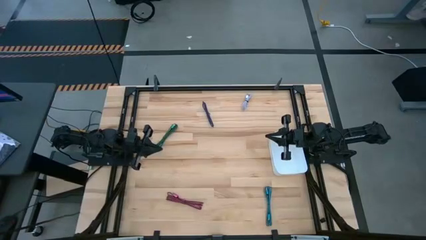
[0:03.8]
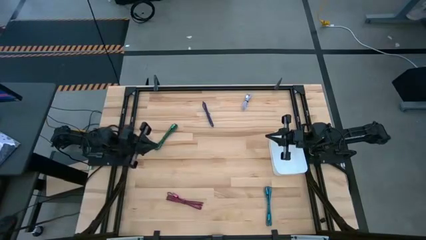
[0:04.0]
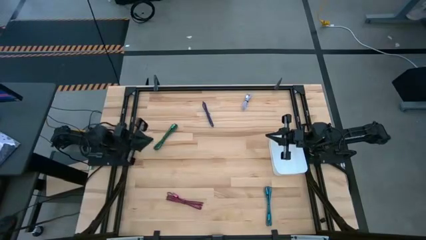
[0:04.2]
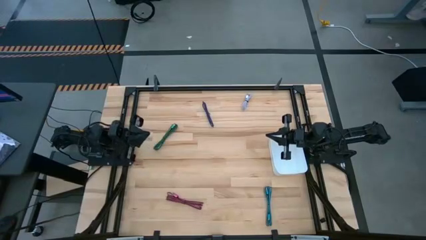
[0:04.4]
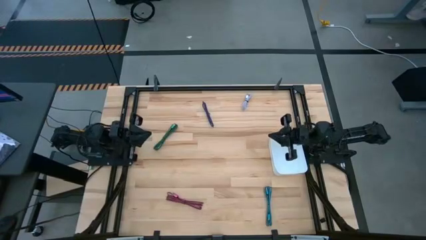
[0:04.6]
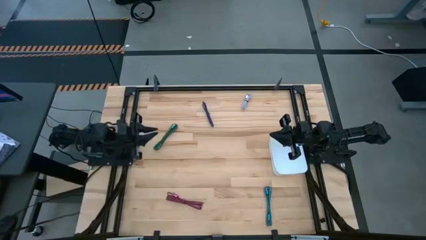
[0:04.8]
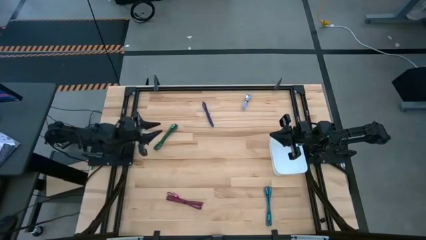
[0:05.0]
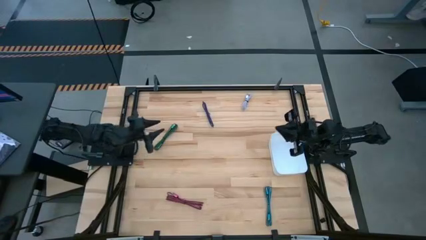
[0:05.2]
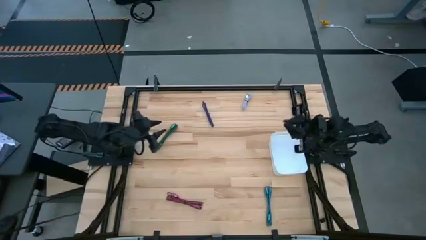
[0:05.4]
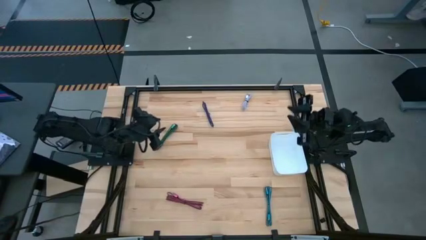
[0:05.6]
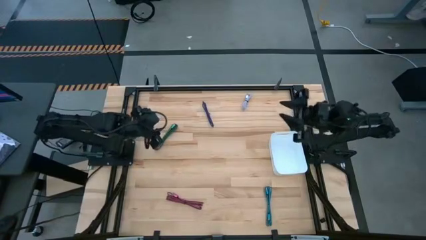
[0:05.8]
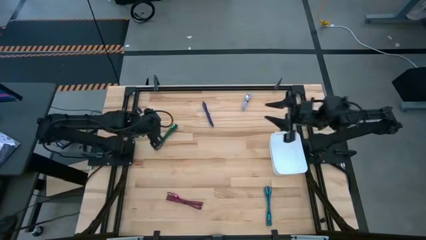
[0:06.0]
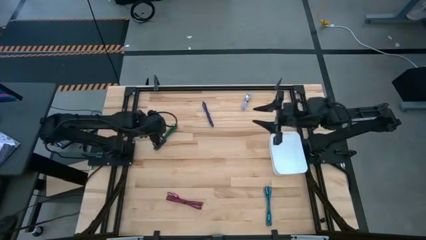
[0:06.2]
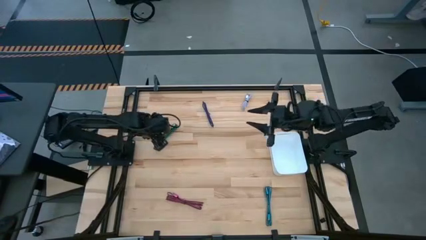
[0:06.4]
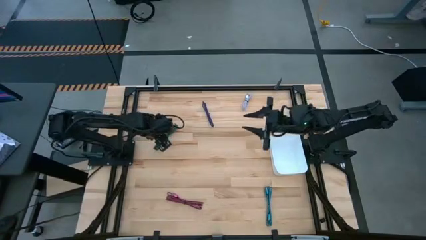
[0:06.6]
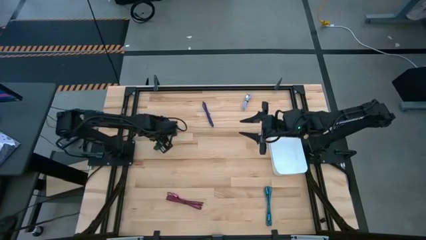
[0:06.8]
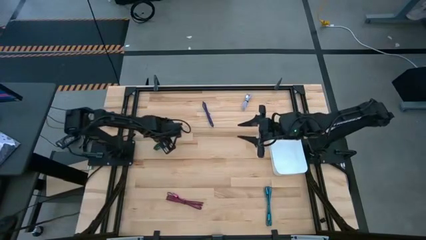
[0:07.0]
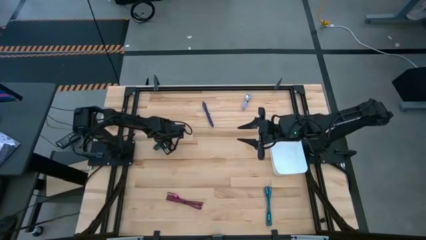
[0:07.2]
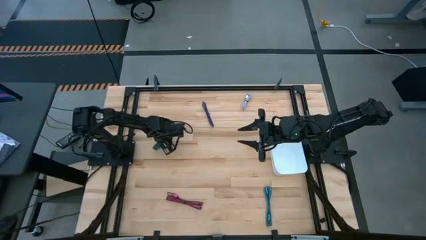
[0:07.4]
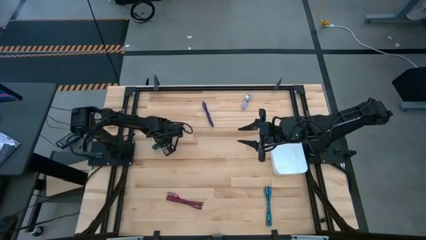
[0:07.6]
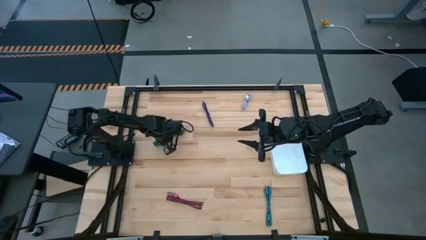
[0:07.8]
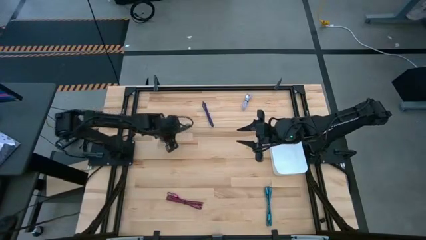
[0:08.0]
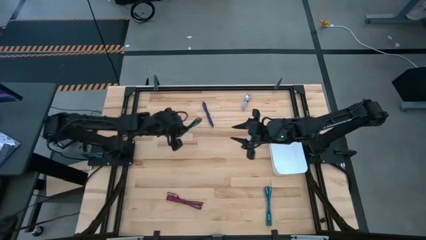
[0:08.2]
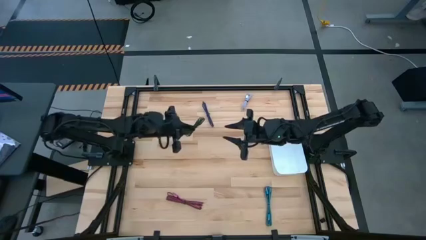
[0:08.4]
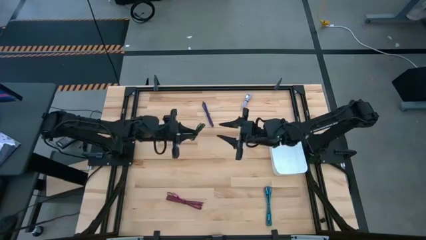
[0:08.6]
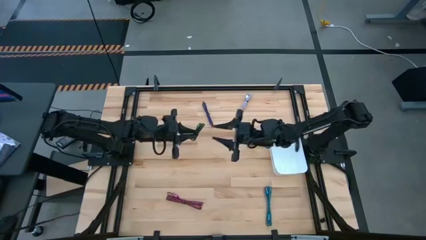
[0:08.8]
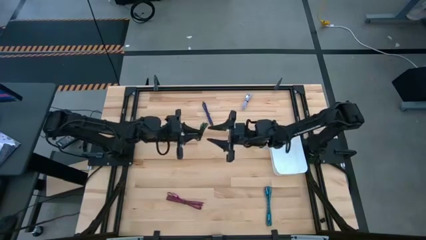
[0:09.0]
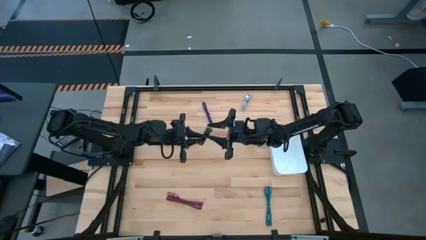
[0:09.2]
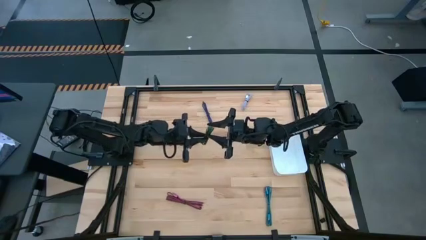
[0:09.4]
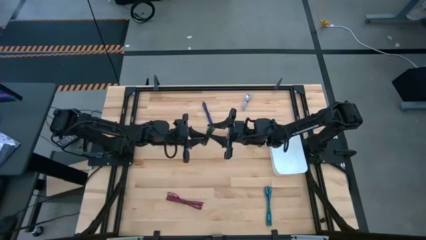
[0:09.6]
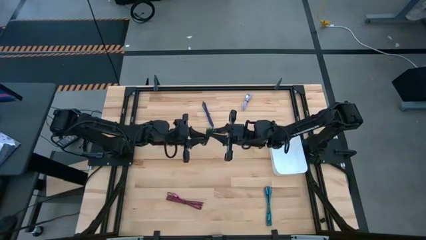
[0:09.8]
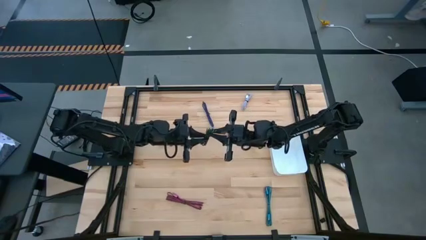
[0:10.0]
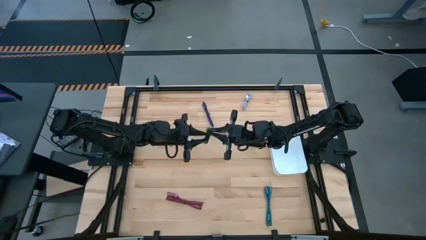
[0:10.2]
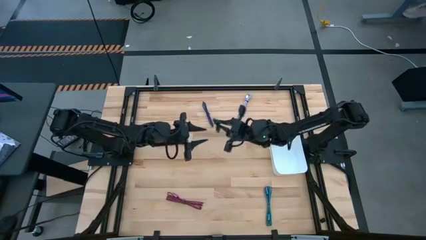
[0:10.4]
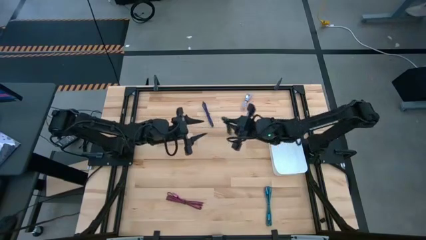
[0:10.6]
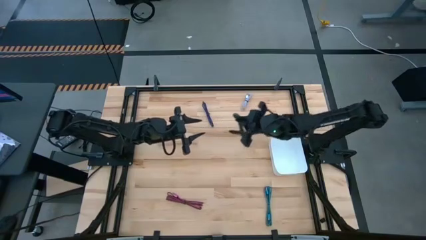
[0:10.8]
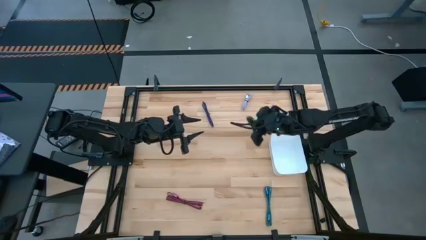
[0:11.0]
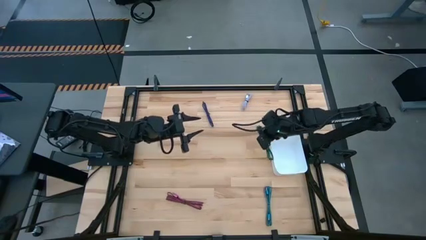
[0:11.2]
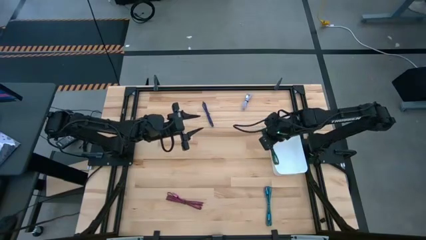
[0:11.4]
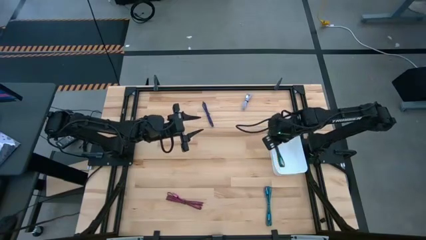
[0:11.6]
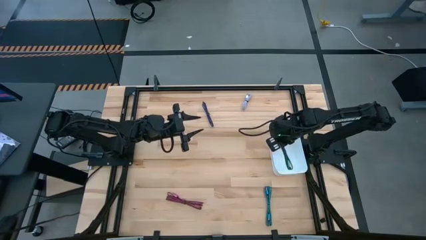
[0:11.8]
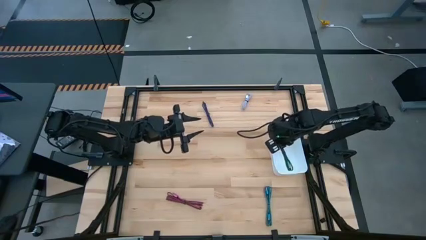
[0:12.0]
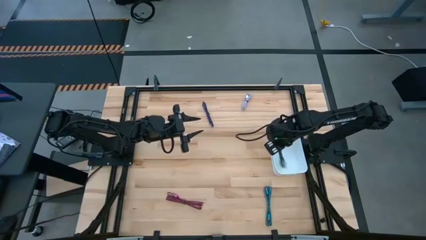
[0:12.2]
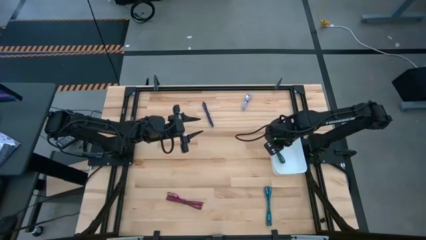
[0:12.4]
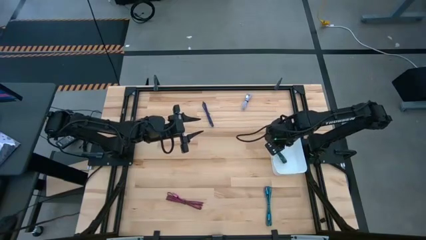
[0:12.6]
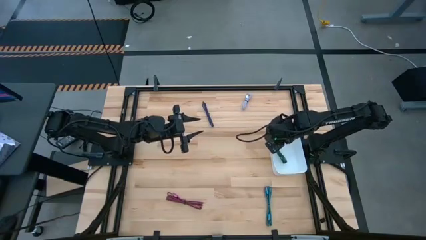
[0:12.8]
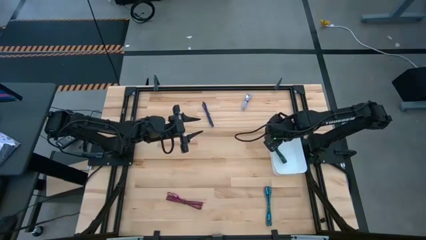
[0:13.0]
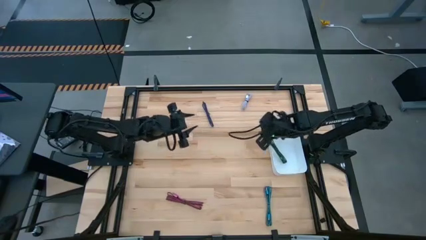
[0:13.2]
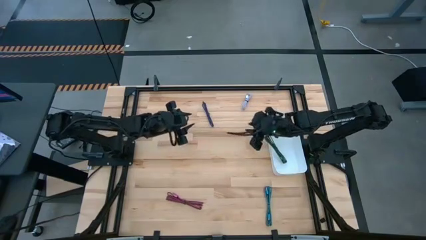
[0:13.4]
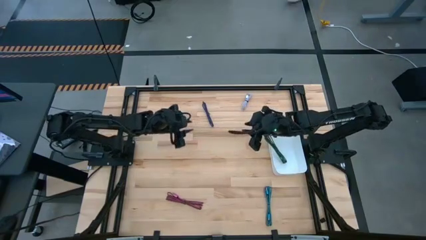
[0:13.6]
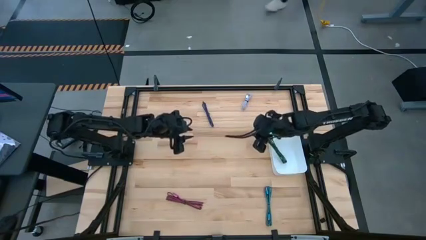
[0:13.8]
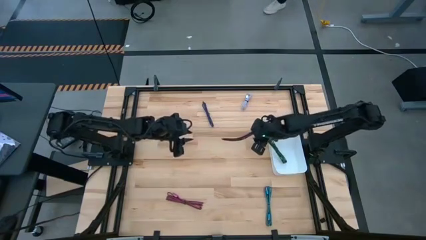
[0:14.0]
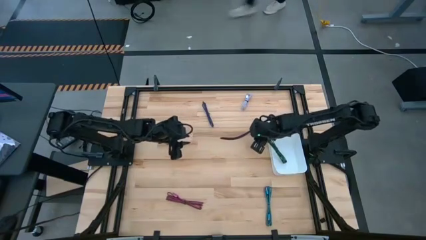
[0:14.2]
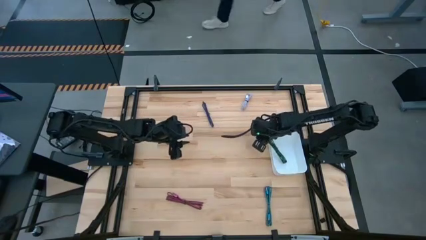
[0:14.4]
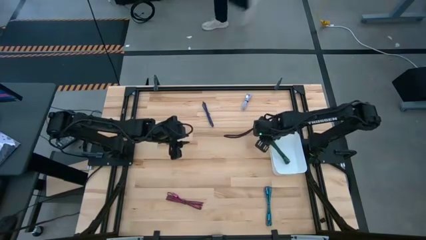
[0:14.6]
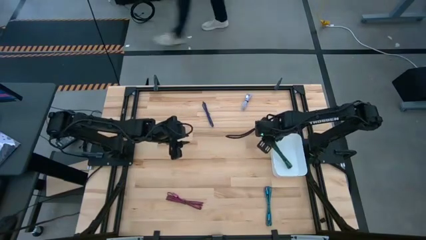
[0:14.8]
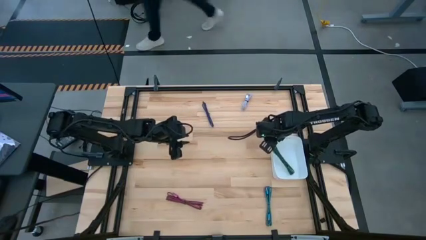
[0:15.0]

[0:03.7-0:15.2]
Task: Pick and place USB-C Cables
Put the green charger cable into the white bin
